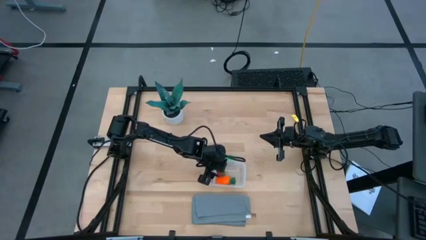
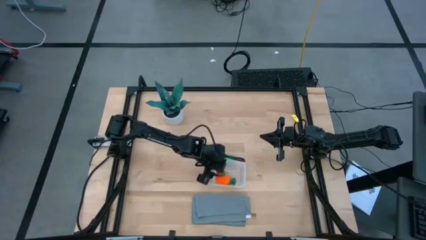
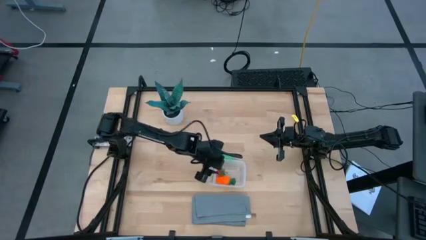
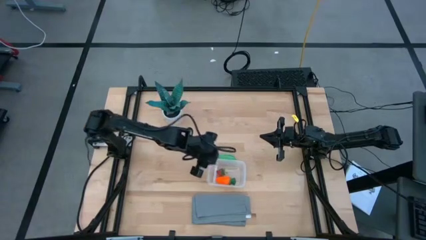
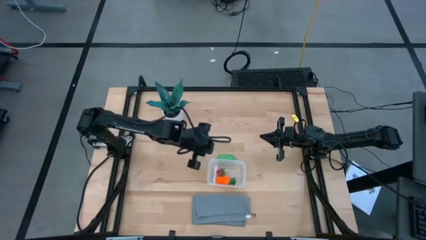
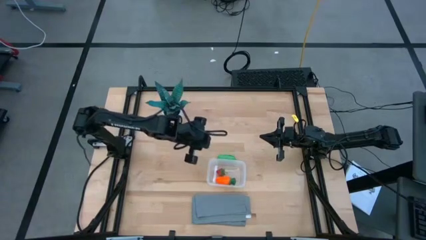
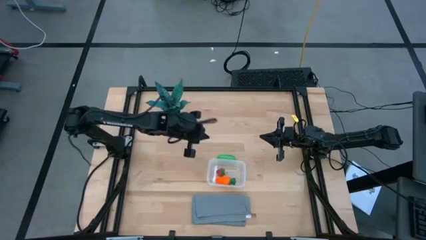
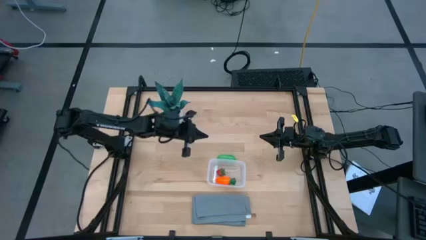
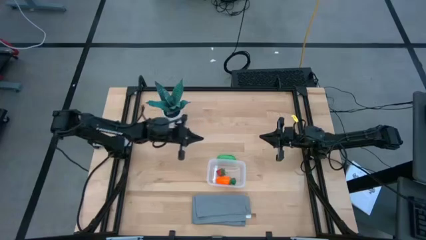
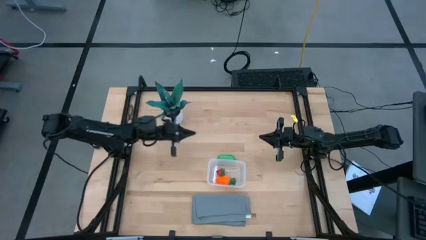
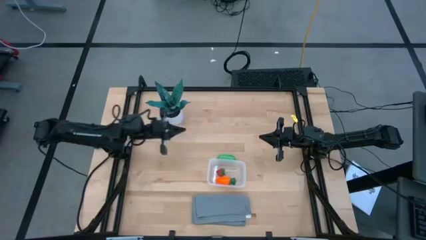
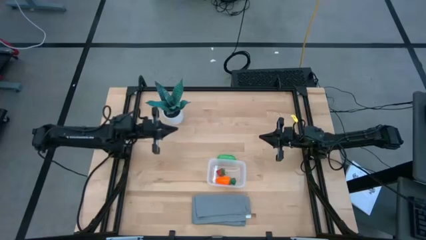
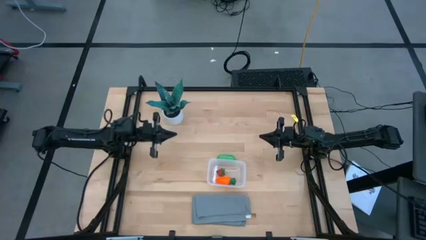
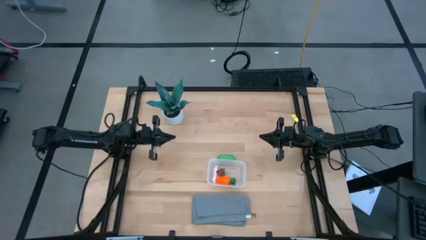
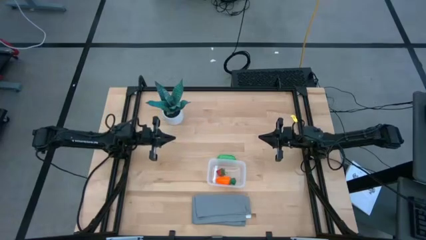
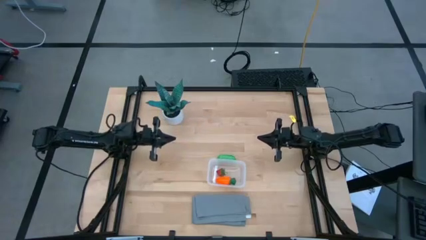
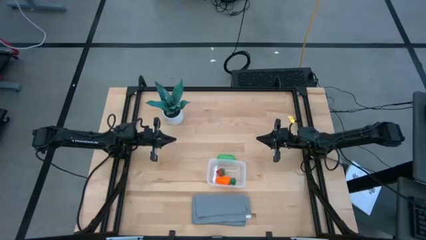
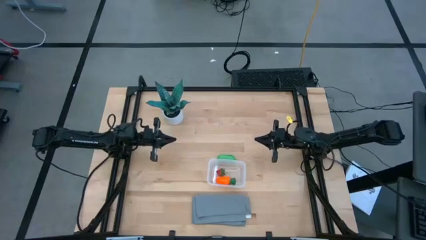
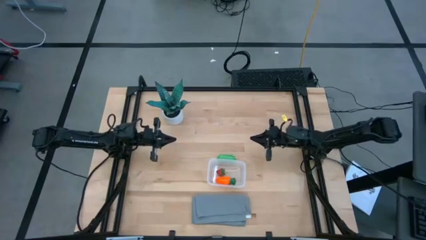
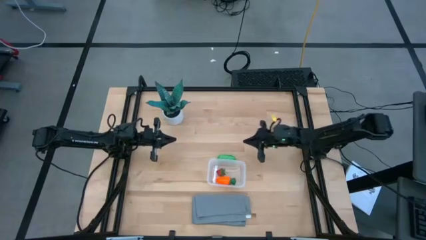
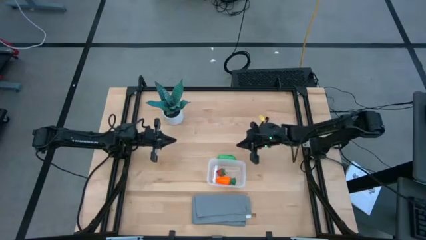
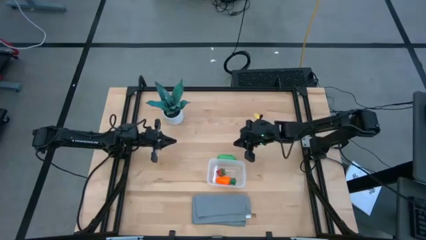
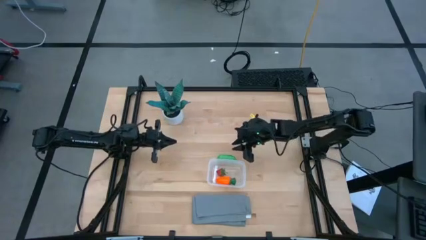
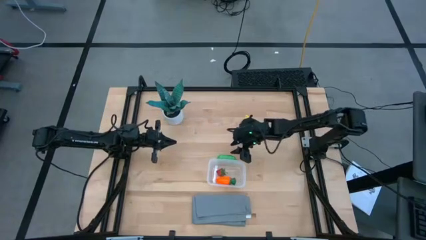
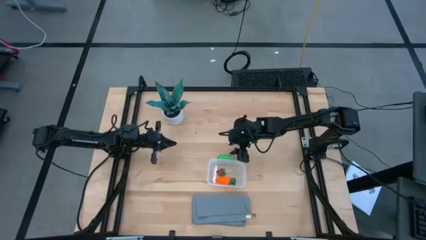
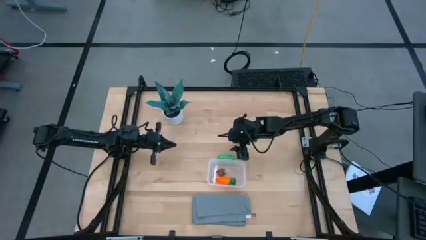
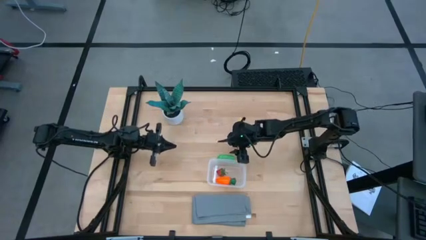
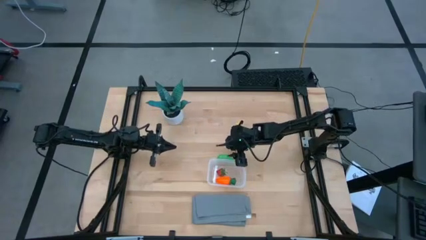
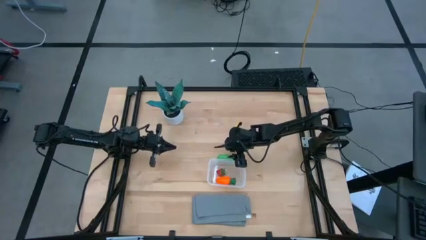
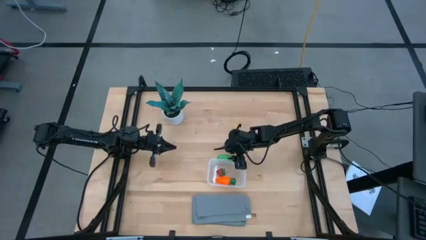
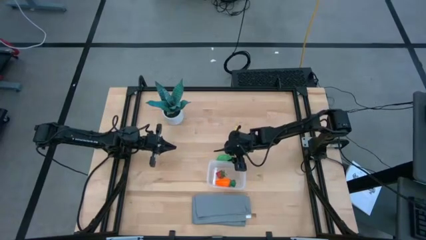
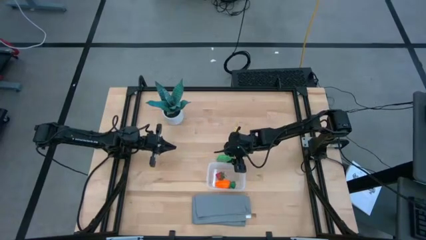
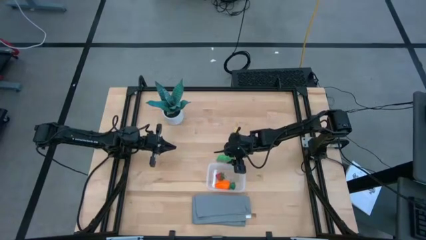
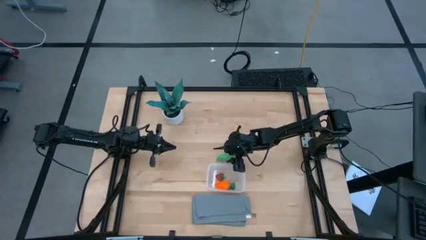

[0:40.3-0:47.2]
Task: Pick and placing Produce into tupperware
Adjust the transparent bin

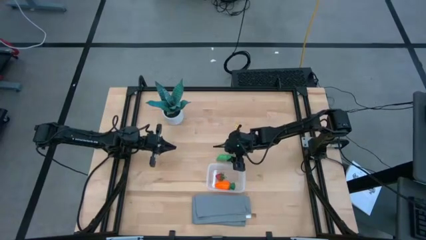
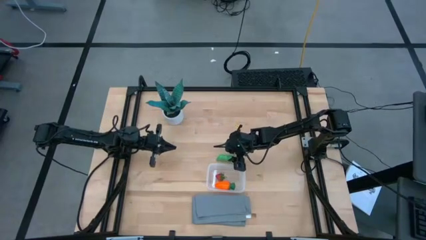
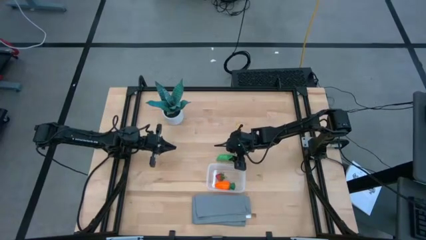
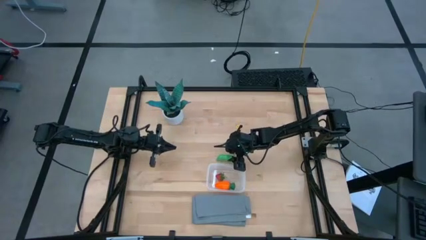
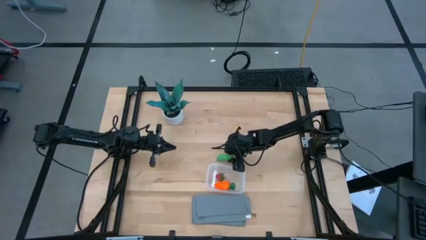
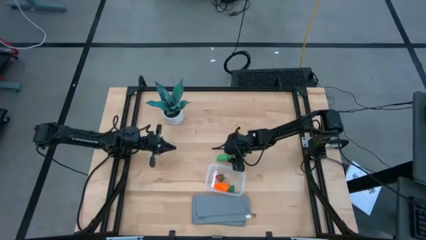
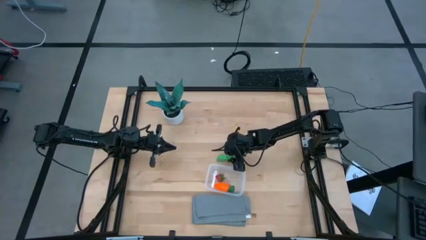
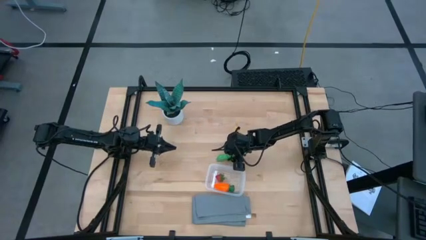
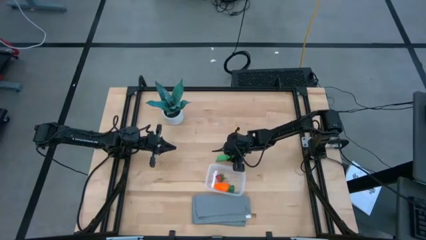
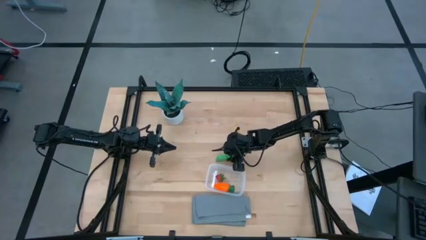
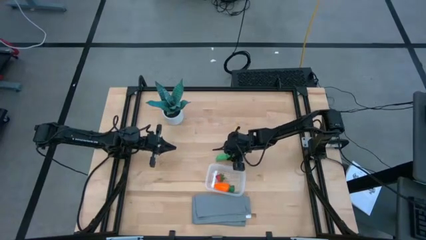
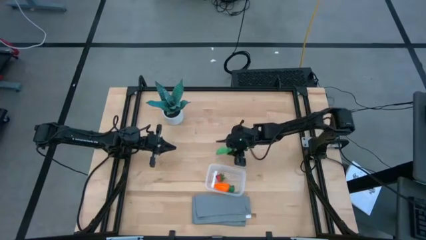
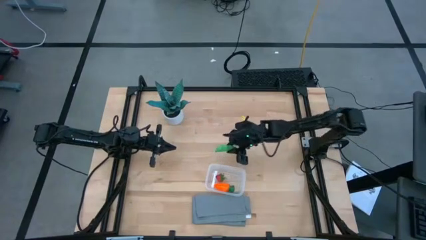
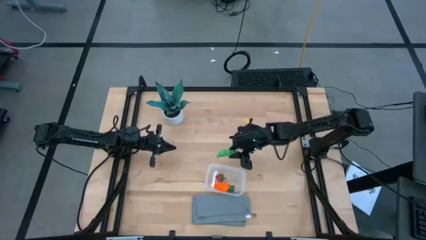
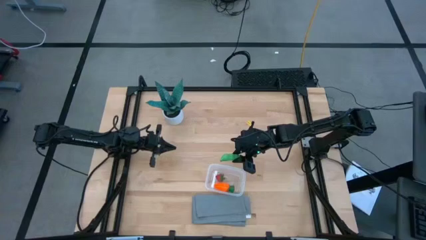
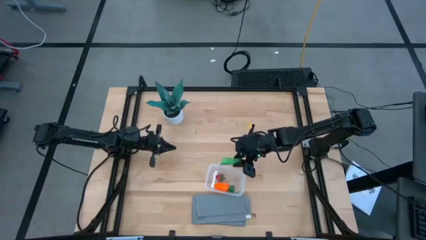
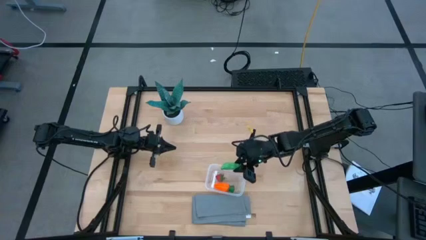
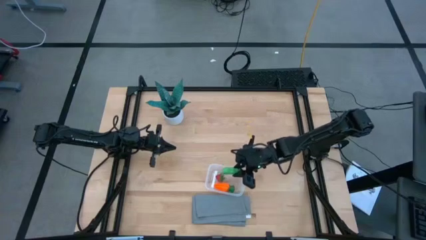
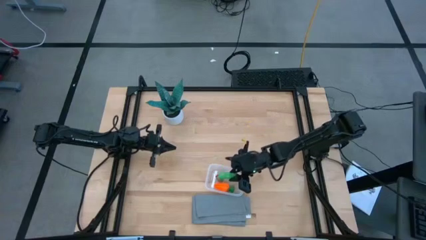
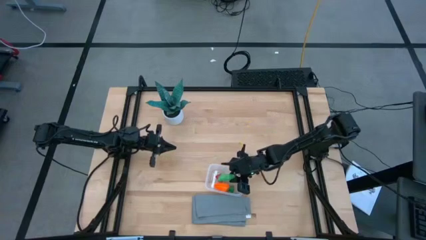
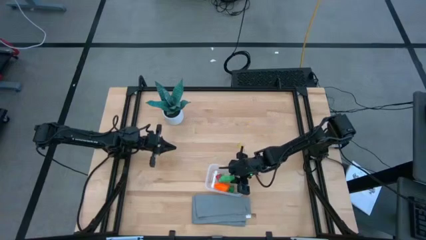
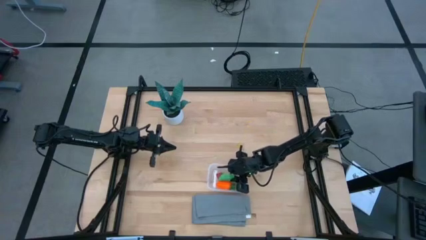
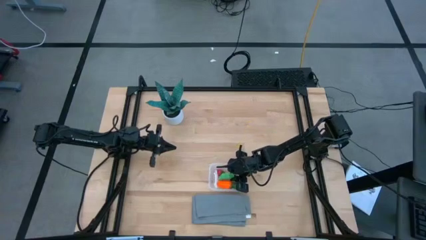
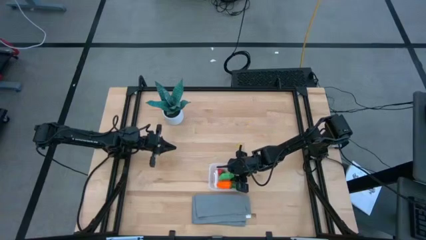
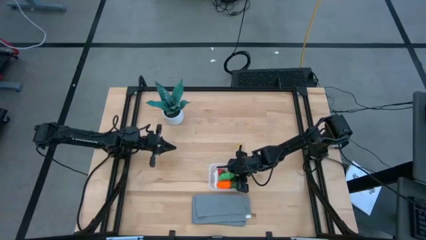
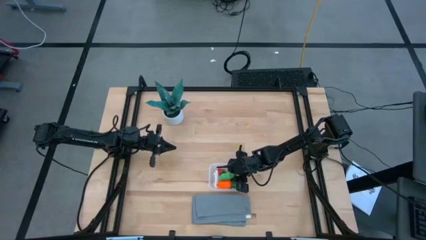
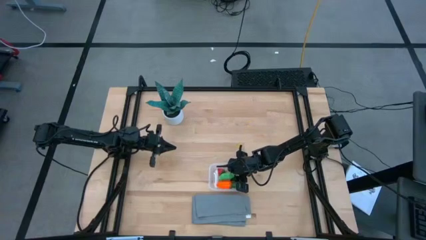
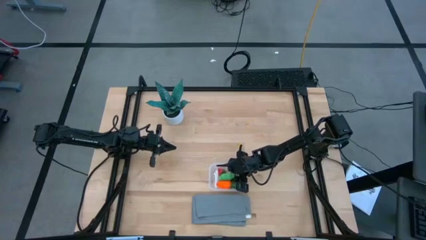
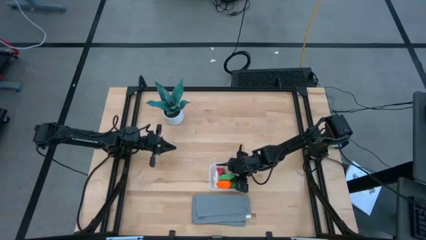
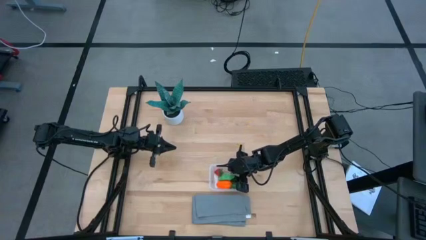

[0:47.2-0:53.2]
Put the green peas into the transparent bin

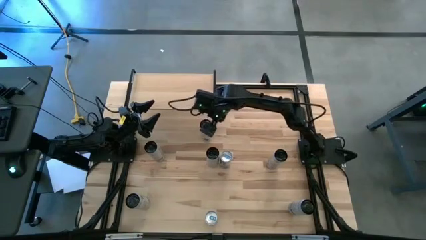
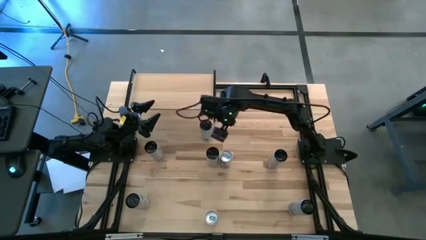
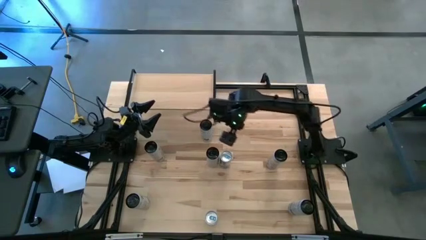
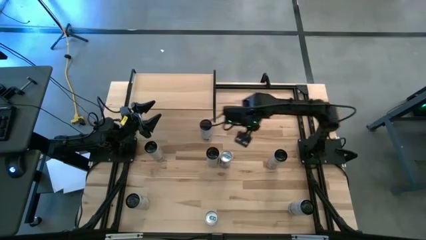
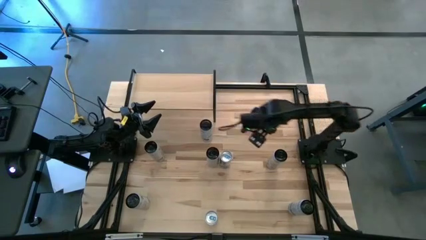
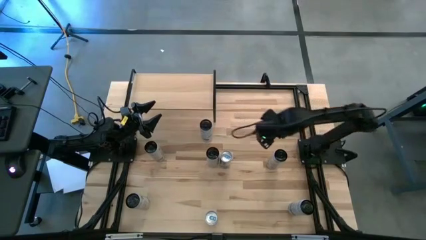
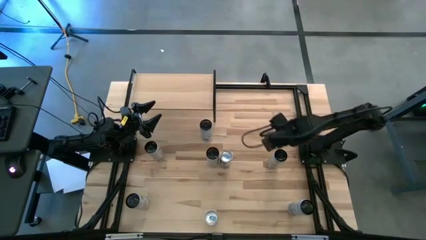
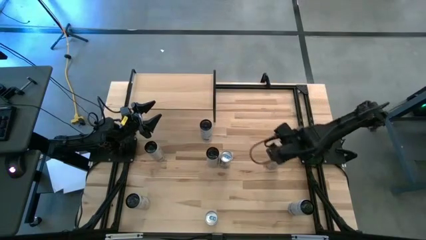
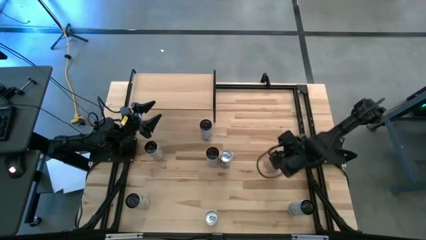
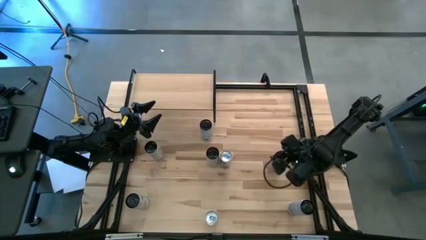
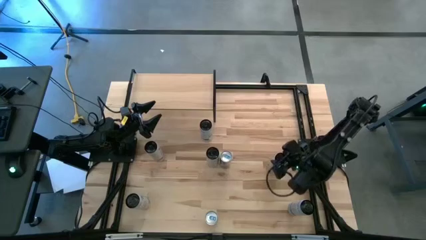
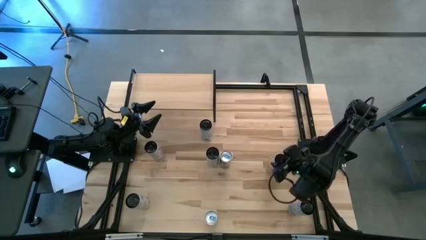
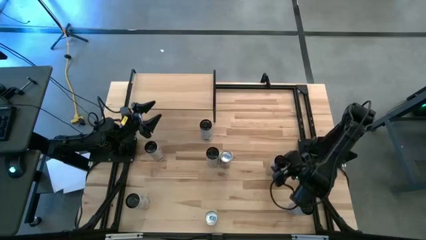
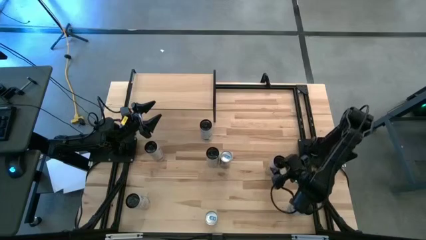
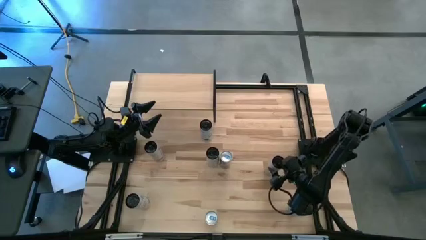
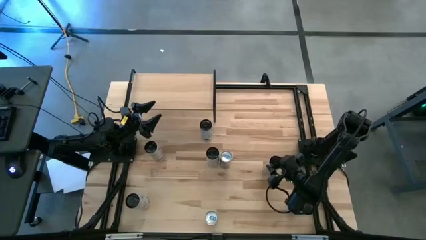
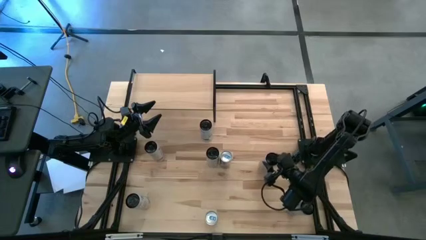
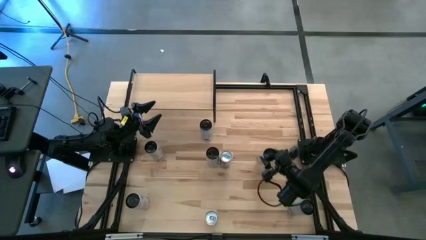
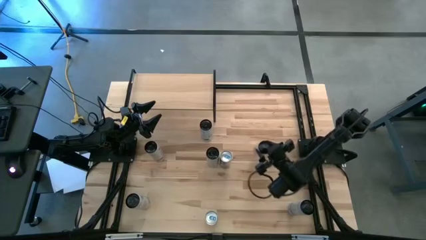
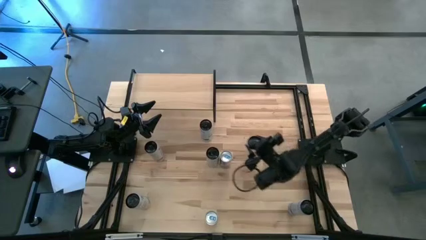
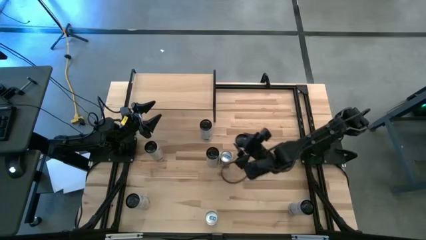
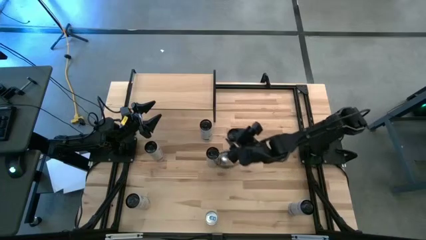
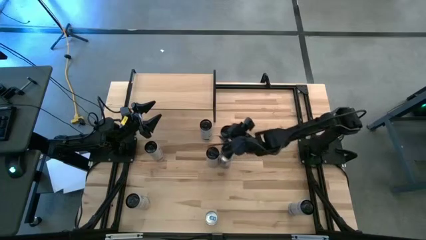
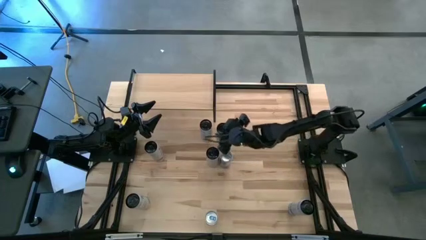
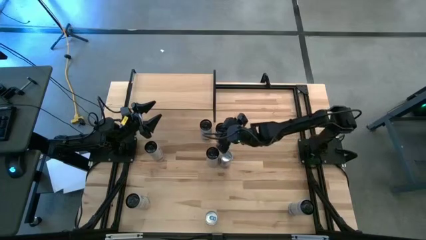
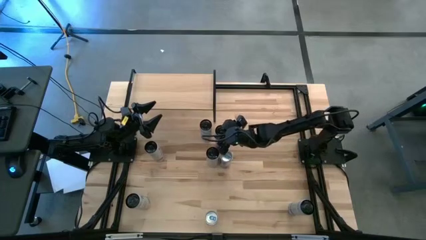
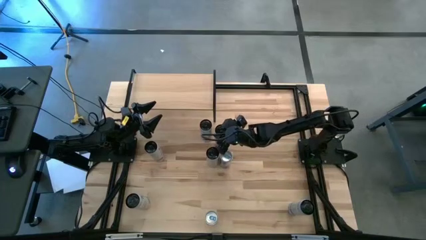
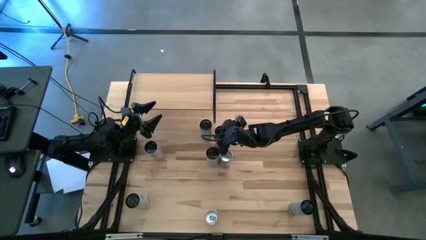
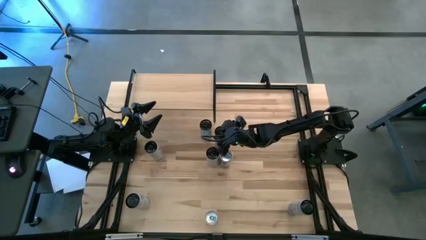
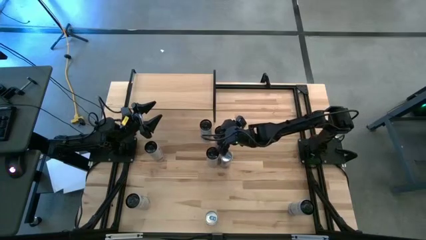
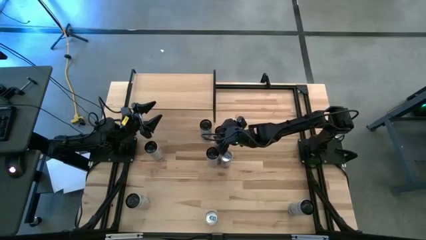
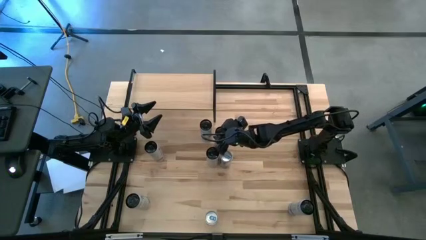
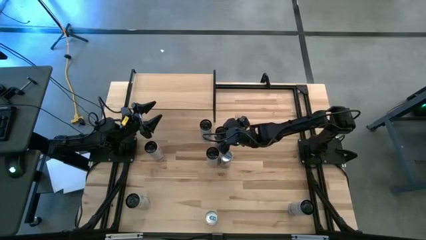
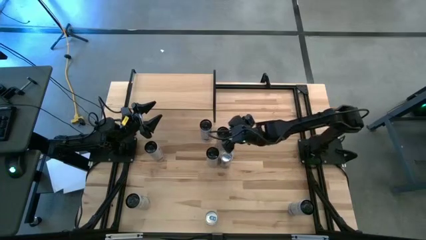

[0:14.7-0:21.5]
Task: Place canned beverage on shelf
Move the right white yellow soda can to the center of the table
